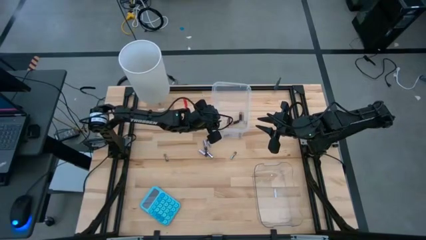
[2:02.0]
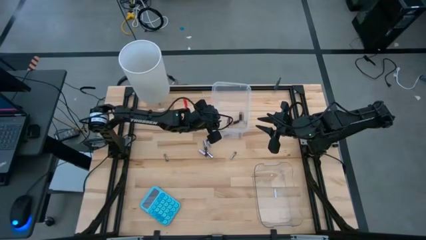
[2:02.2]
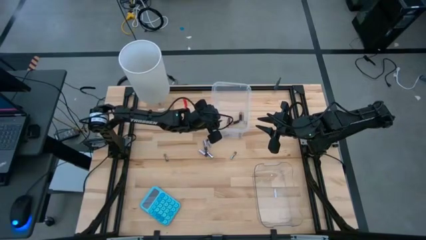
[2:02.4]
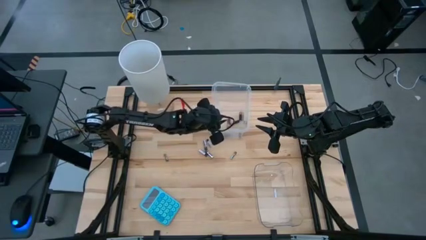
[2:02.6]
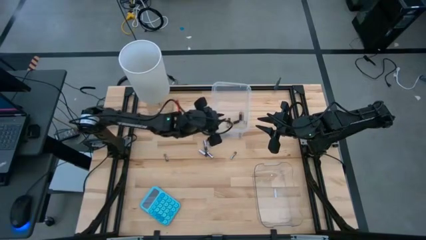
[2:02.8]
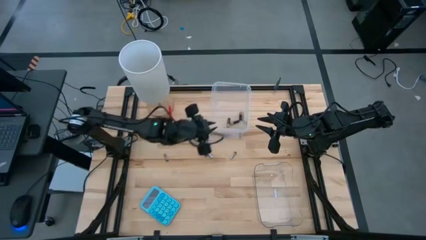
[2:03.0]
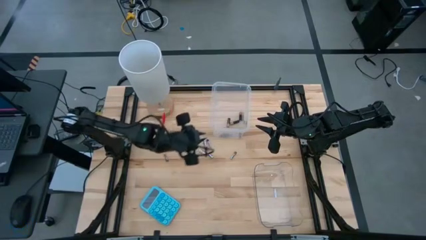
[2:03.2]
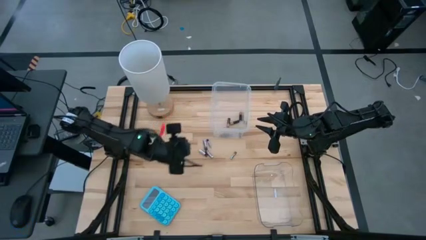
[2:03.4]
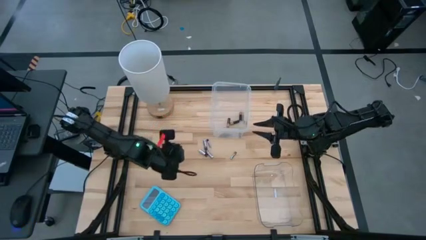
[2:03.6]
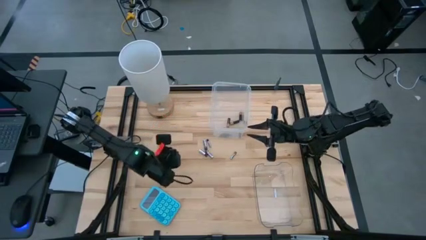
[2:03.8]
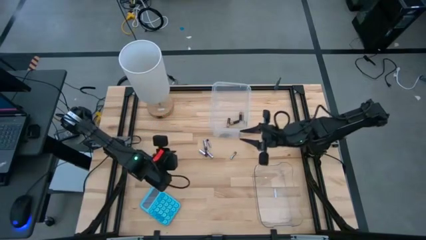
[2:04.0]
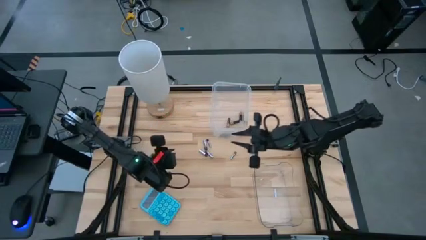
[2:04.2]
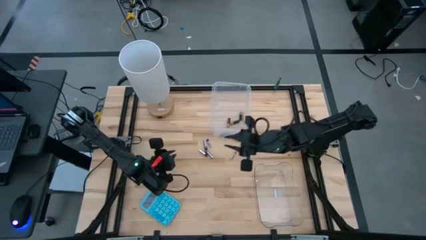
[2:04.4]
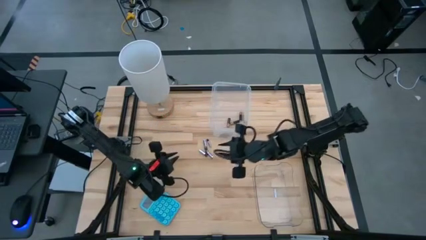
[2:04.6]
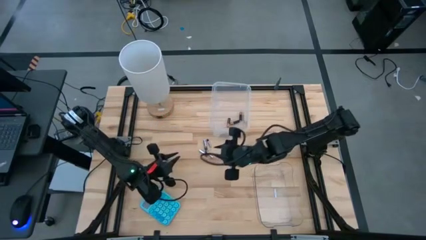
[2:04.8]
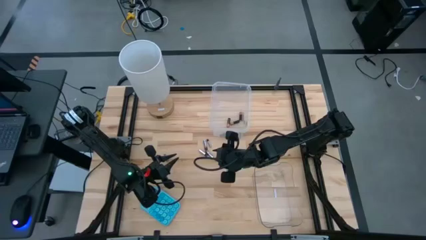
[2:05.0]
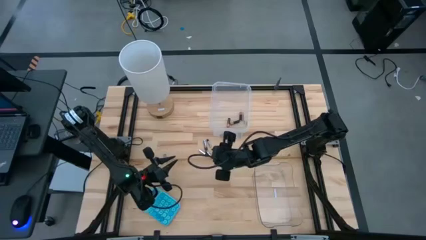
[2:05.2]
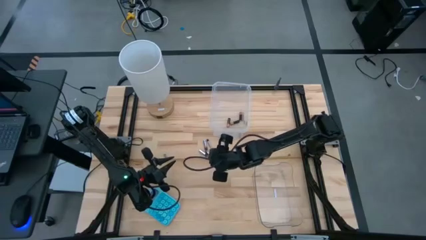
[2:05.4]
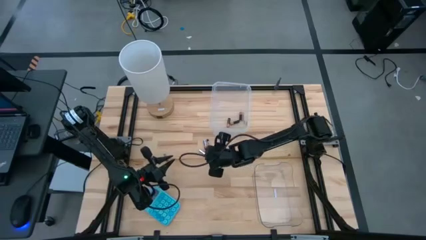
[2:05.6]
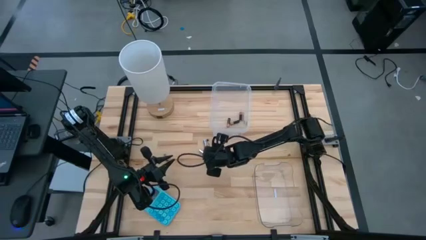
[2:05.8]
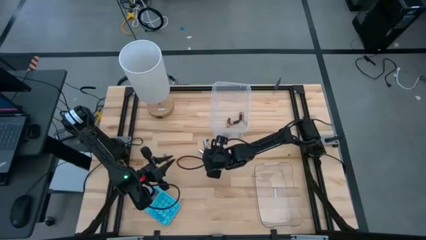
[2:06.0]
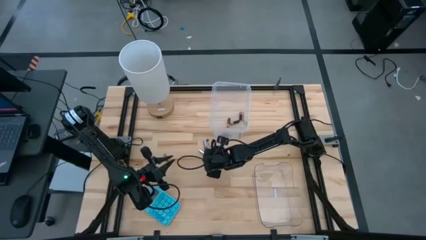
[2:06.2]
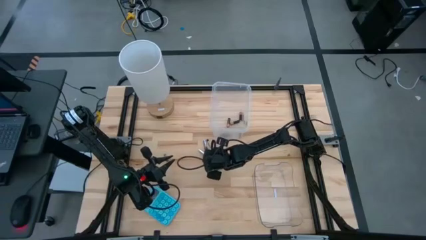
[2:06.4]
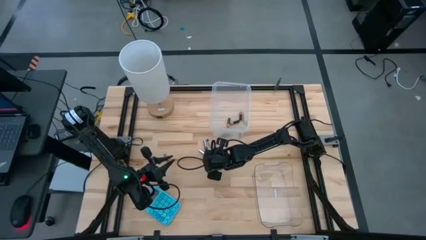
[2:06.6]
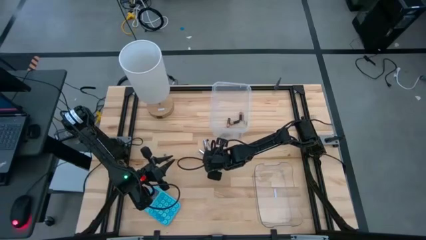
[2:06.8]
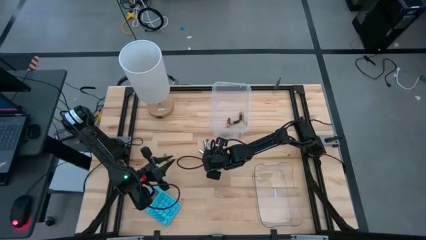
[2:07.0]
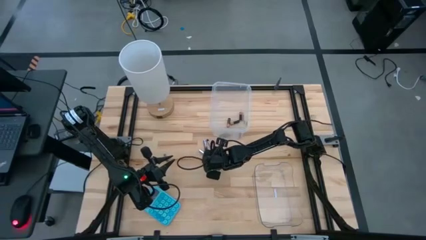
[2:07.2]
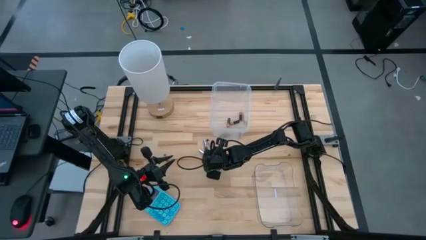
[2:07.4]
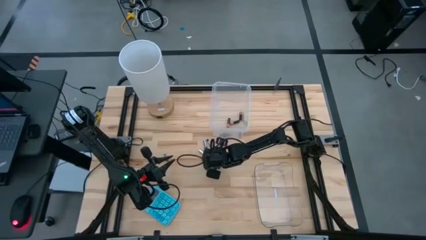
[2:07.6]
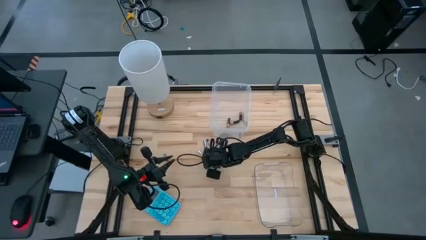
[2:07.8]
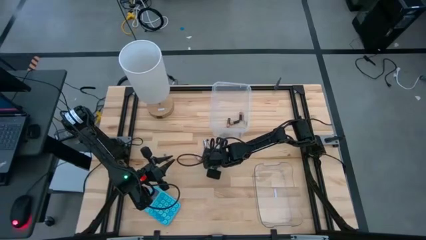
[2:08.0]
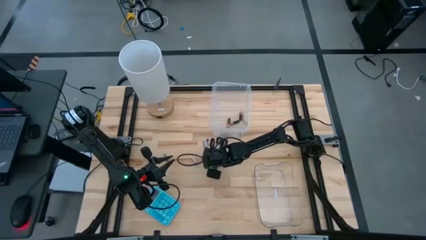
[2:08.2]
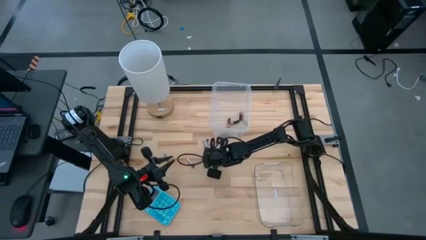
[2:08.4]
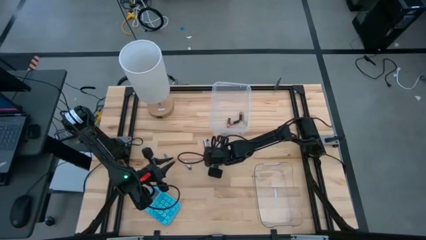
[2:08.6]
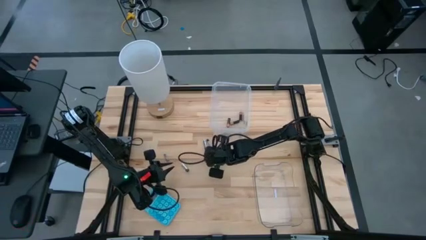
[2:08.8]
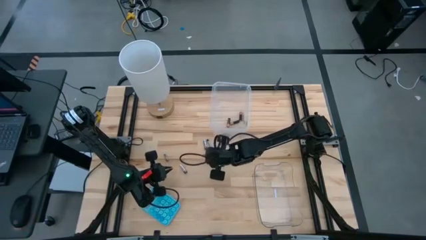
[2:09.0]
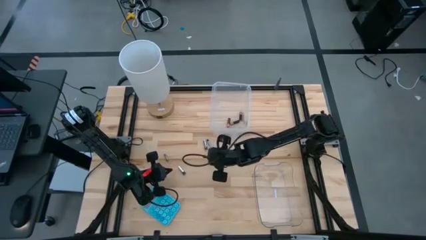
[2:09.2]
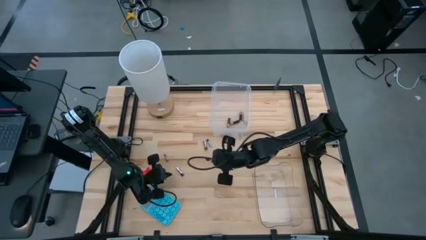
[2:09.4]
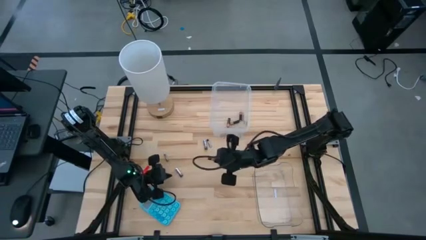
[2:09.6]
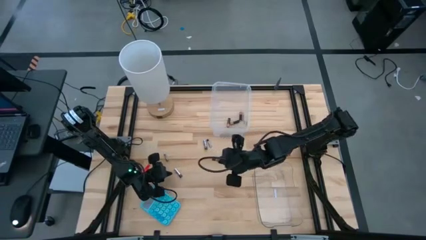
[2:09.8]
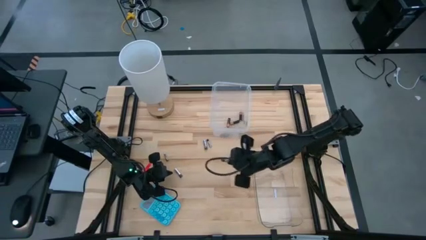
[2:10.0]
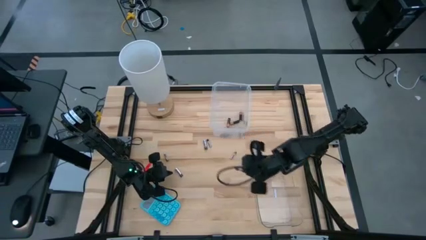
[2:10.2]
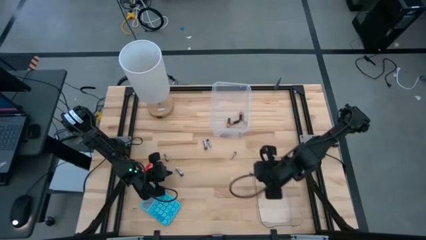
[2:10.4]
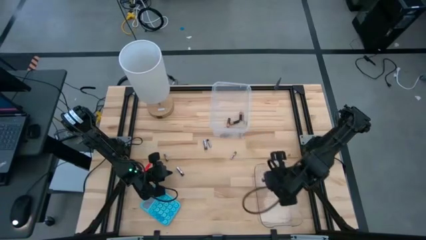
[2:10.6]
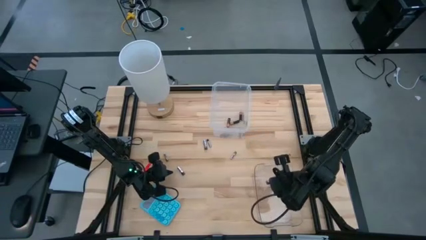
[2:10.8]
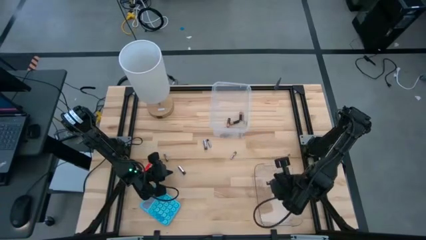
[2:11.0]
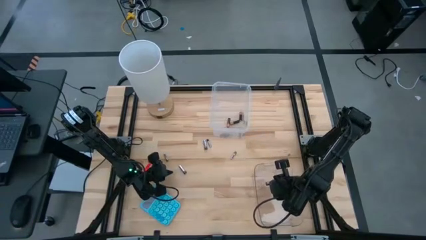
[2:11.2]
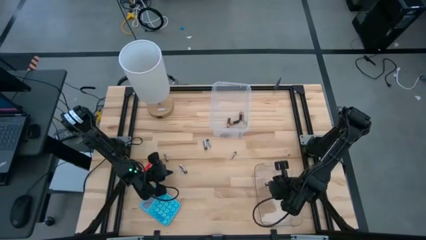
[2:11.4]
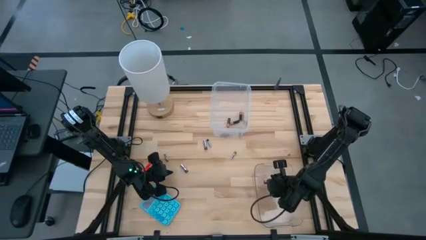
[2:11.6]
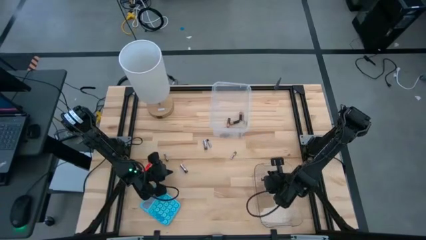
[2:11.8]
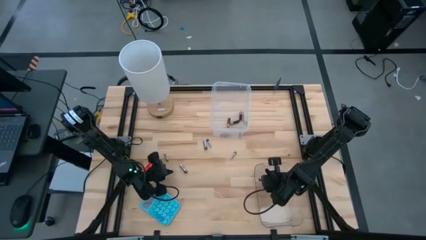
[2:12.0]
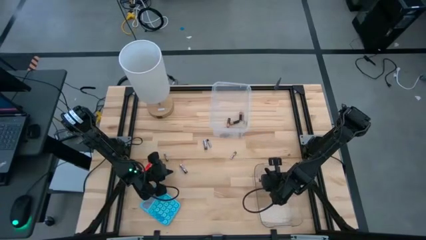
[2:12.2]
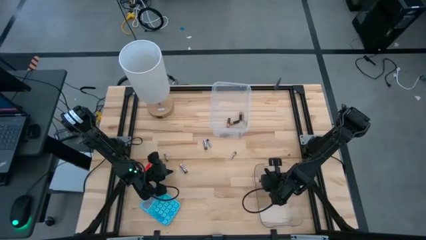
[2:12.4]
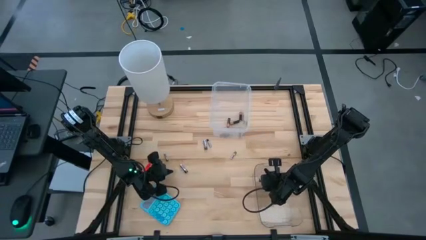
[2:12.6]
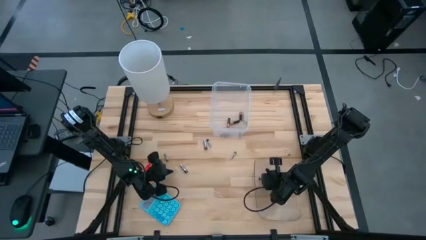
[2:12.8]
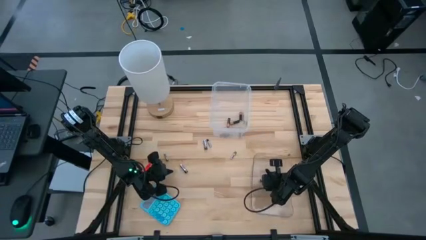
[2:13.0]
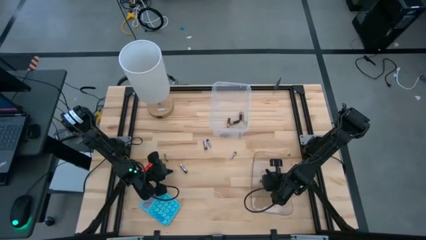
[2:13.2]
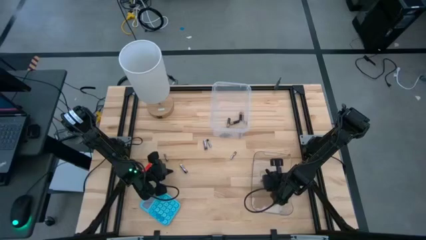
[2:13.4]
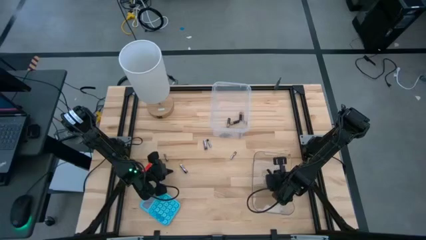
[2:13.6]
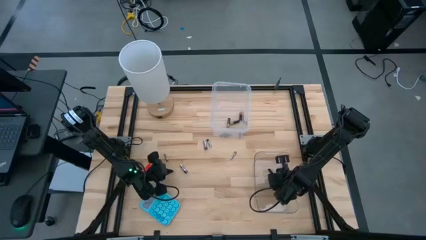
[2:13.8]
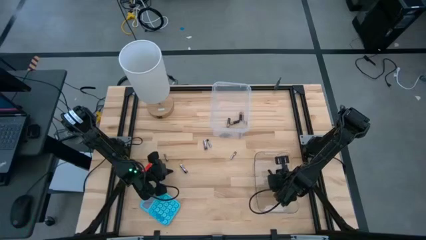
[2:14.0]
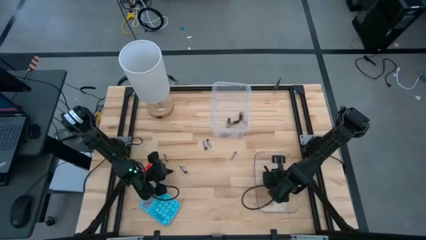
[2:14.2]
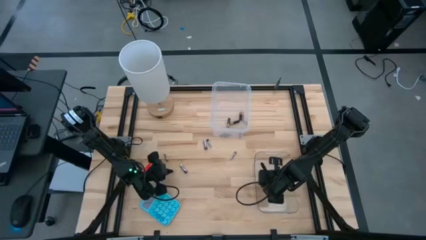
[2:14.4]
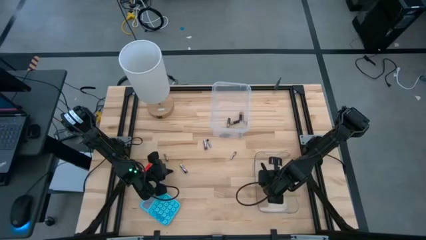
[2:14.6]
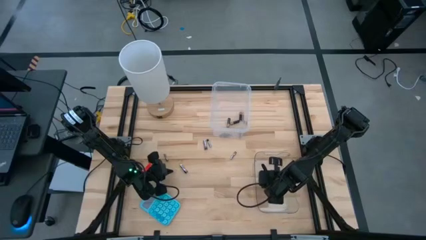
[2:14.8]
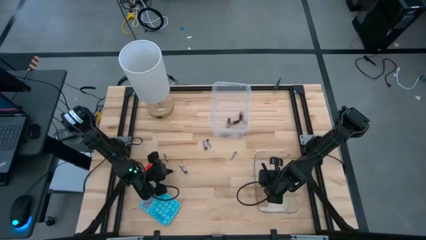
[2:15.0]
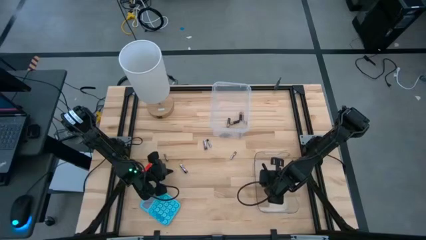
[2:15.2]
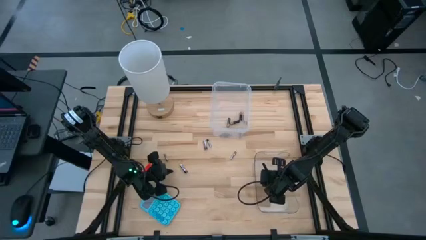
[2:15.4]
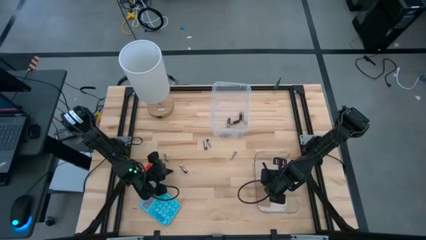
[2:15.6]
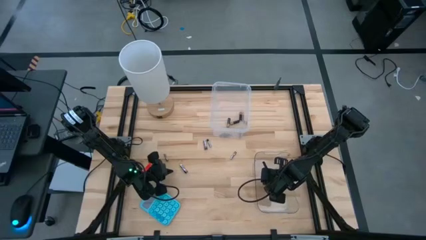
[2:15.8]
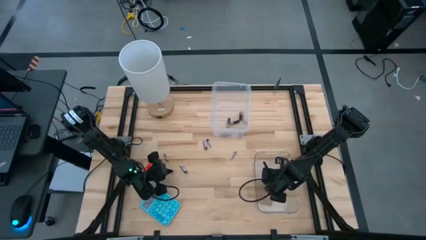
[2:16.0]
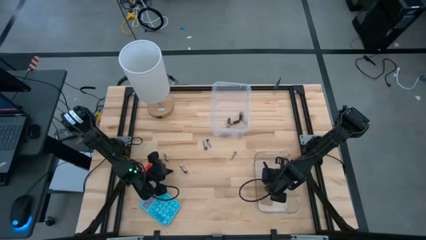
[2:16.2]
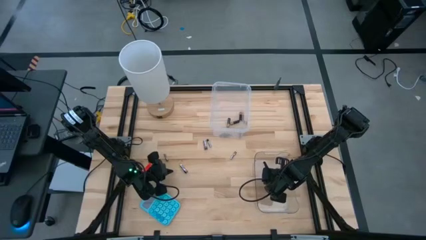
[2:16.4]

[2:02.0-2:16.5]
Task: Sort batteries
Put the silver battery into the bottom transparent bin

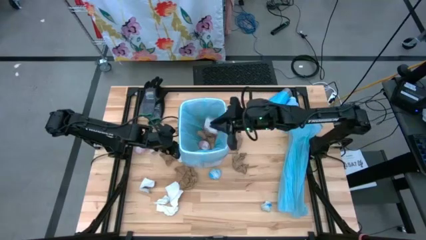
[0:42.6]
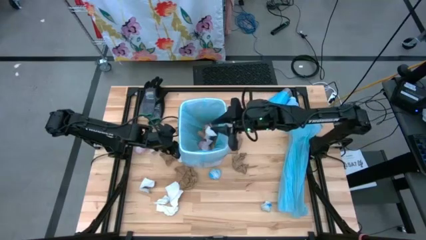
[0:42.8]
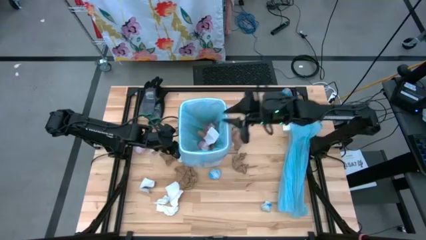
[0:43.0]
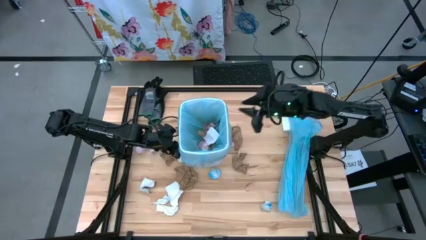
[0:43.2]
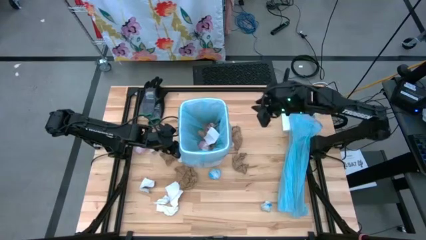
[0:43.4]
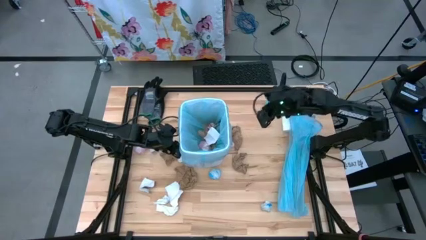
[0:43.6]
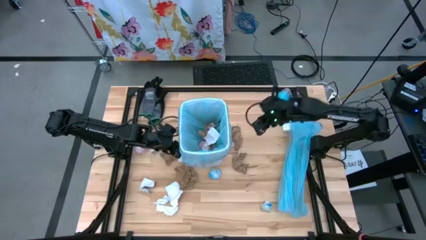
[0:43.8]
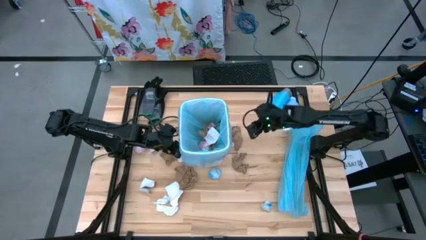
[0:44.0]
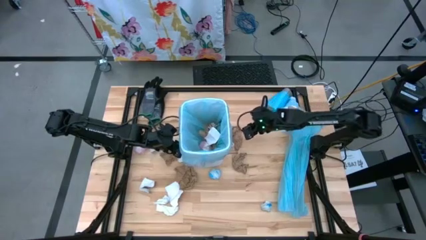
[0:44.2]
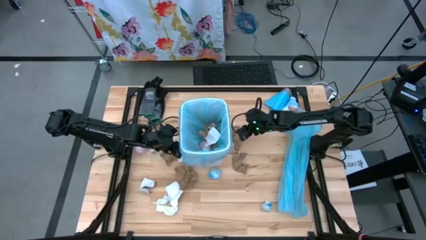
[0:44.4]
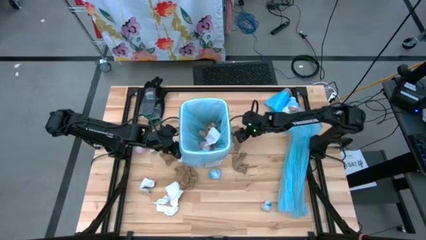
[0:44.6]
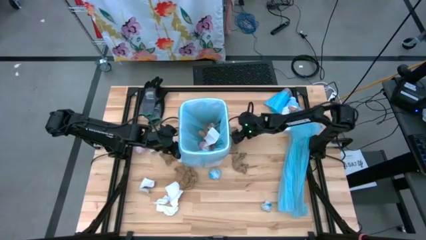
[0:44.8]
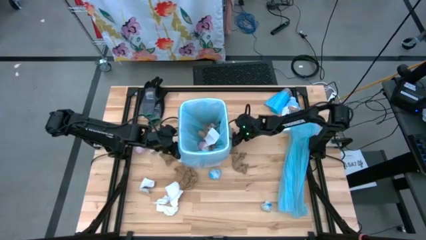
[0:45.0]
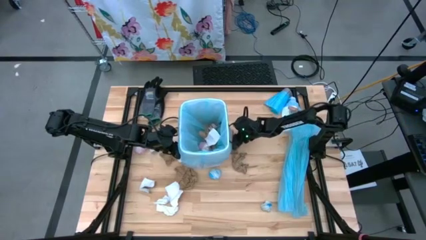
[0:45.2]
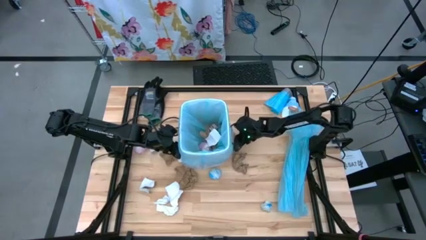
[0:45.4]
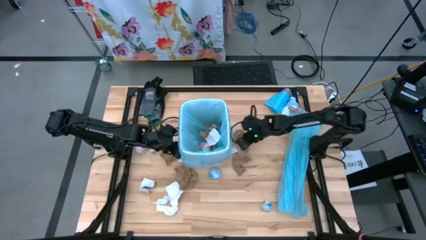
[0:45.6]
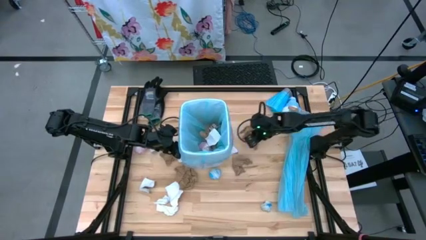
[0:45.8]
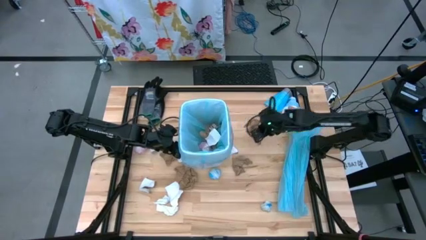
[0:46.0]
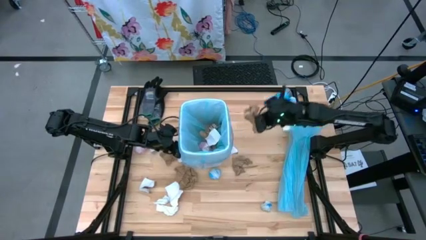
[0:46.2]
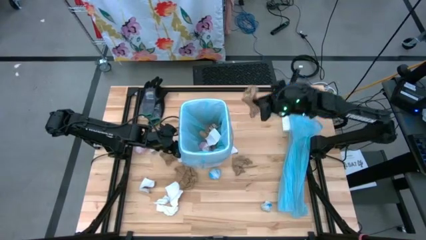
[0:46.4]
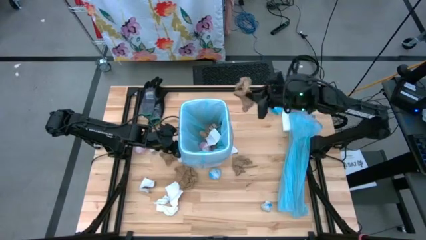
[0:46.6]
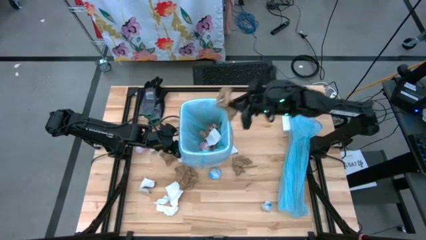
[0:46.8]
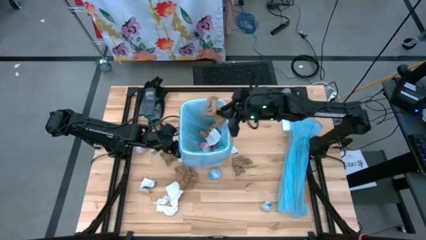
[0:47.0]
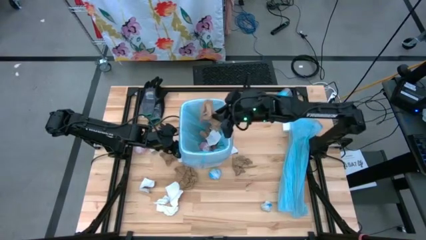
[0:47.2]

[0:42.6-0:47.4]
Task: place trash/remove bag and relplace
Put the brown napkin into the trash bin
